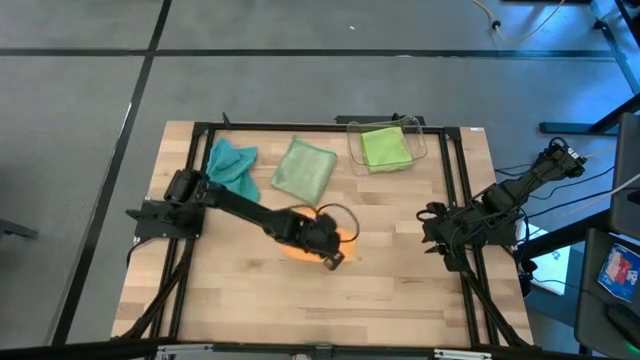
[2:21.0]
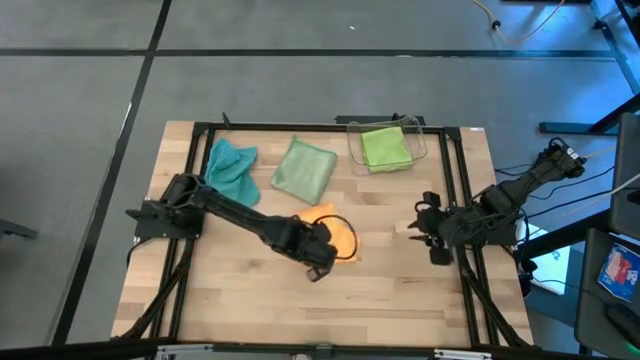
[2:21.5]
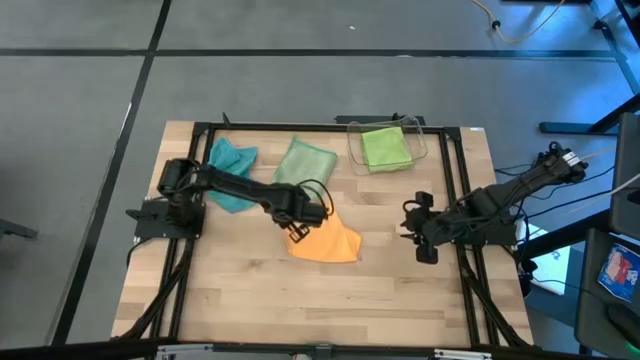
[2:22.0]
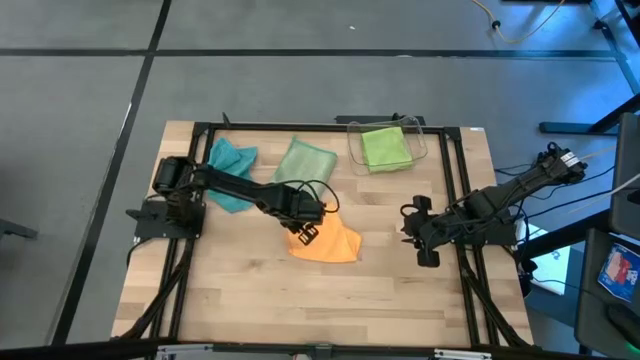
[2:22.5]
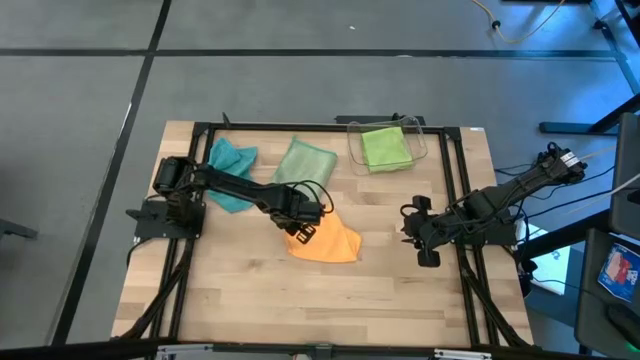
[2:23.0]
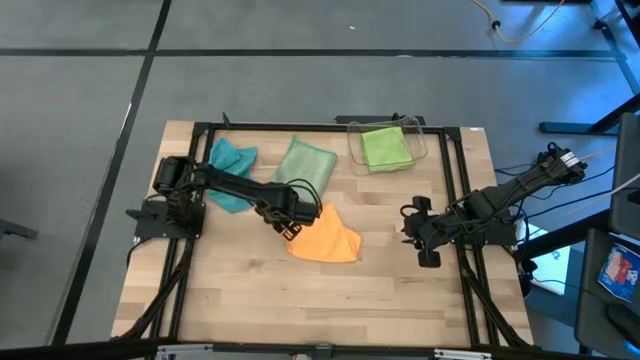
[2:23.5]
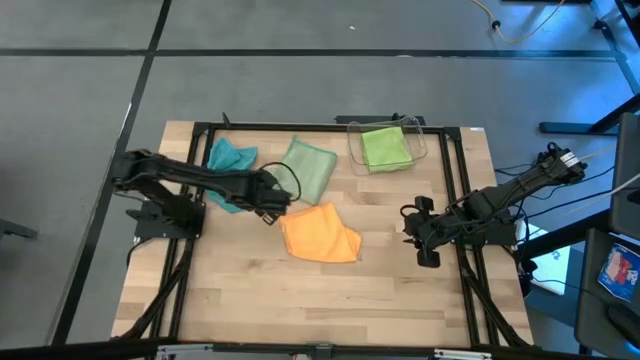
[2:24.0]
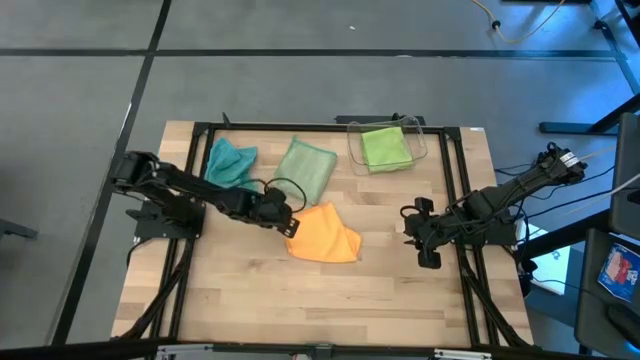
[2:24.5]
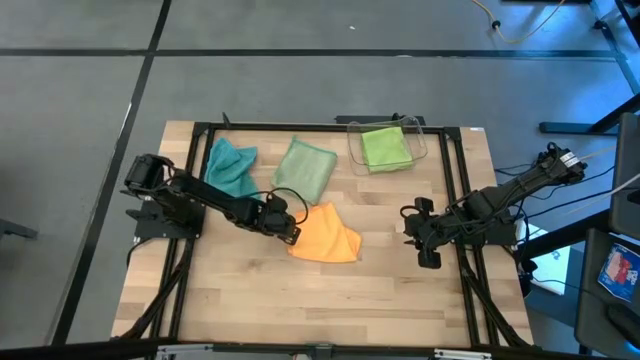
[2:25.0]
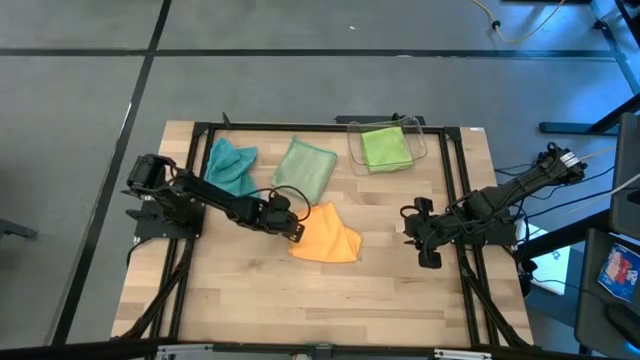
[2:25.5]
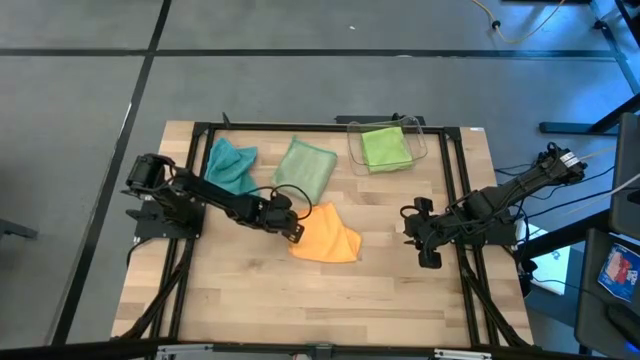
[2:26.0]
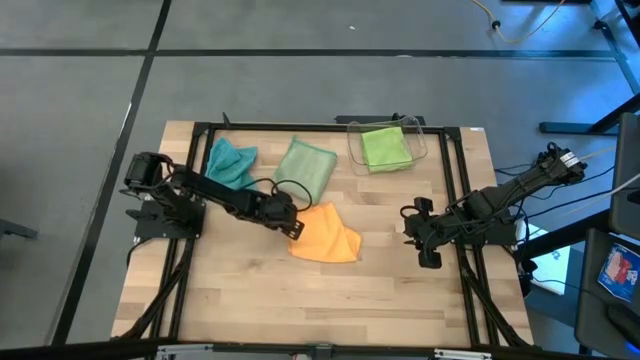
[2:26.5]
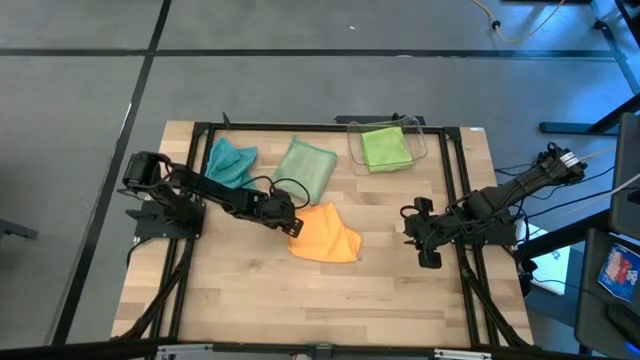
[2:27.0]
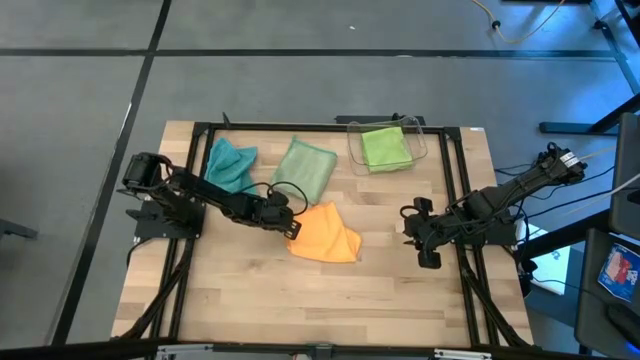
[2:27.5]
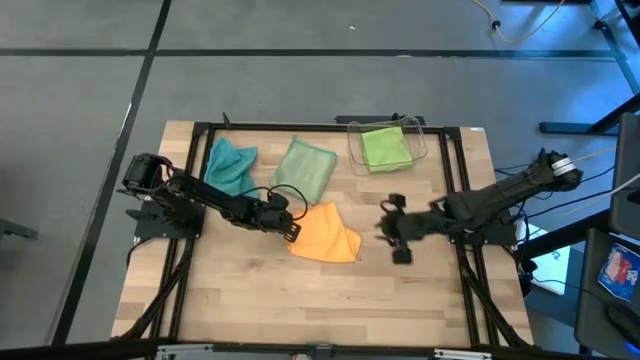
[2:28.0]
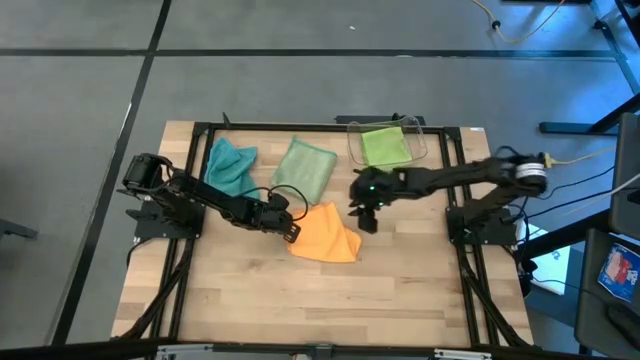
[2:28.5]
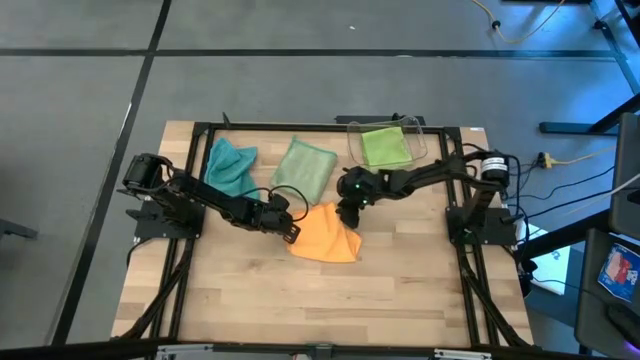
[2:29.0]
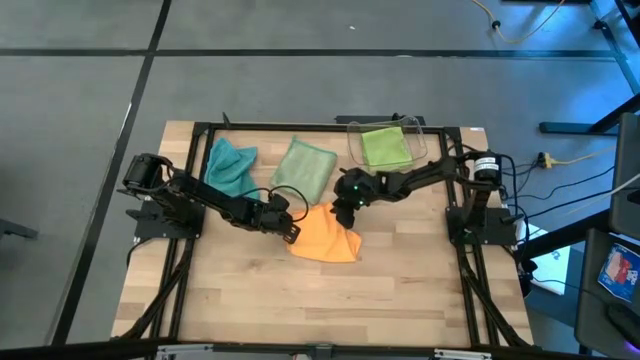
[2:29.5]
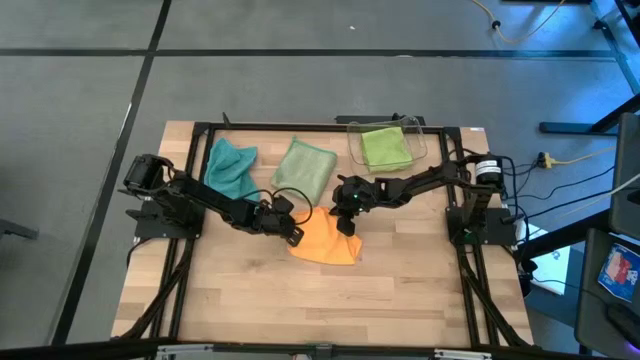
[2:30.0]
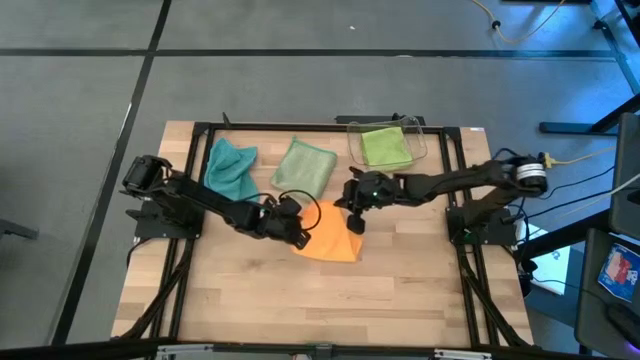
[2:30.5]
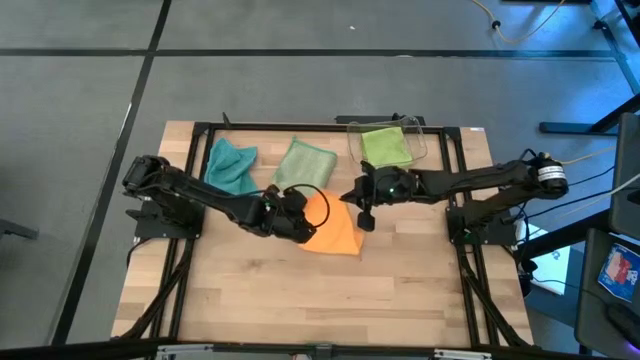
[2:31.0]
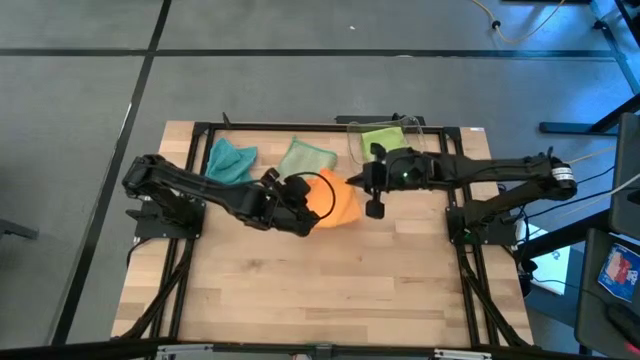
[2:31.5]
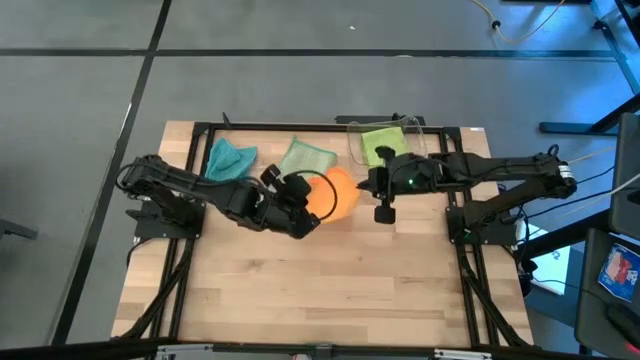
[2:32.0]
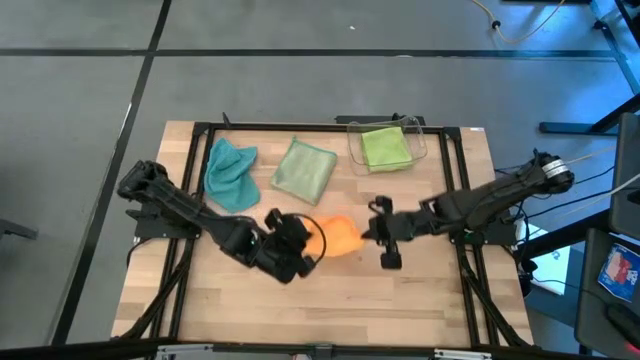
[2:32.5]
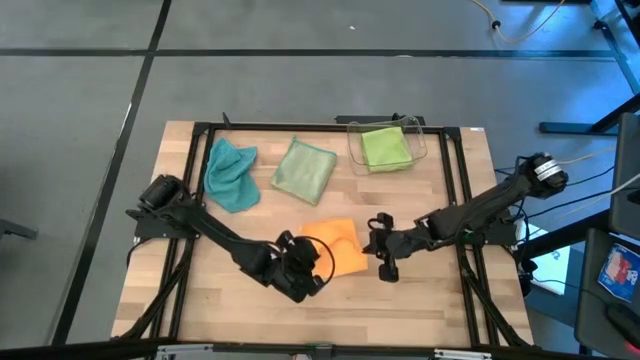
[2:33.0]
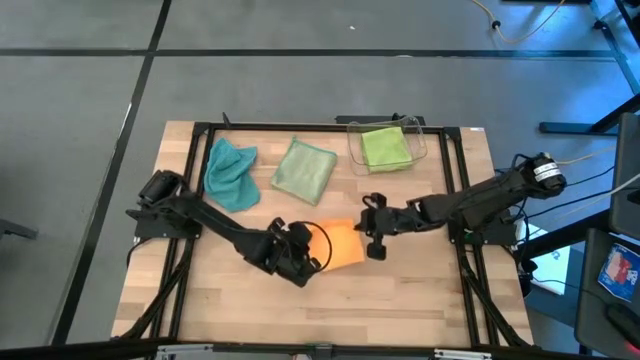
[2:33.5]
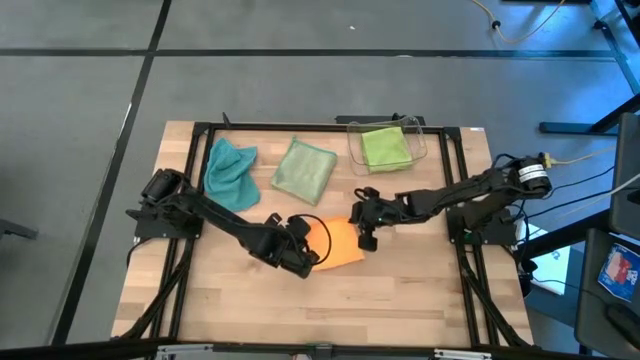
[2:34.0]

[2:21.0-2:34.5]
Task: Fold microfiber towels
Fold the orange microfiber towel on top of the light green microfiber towel

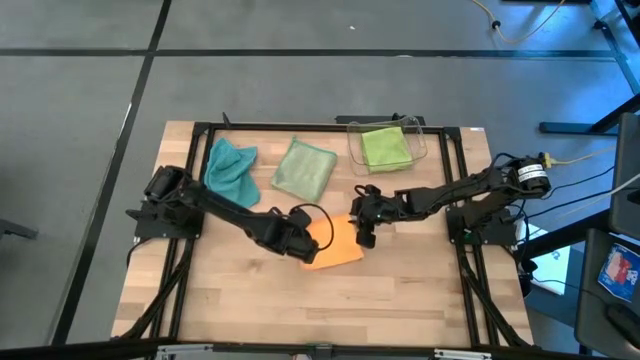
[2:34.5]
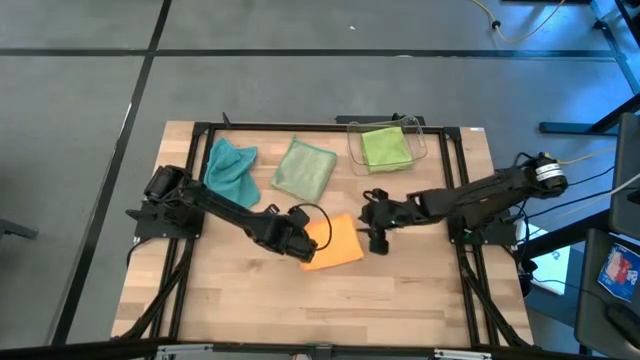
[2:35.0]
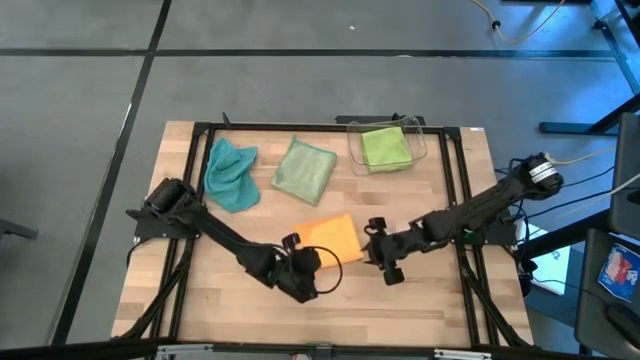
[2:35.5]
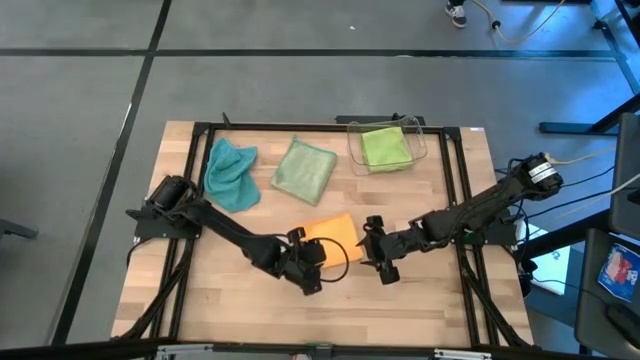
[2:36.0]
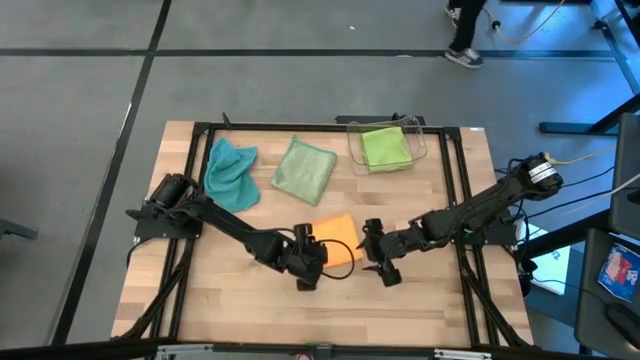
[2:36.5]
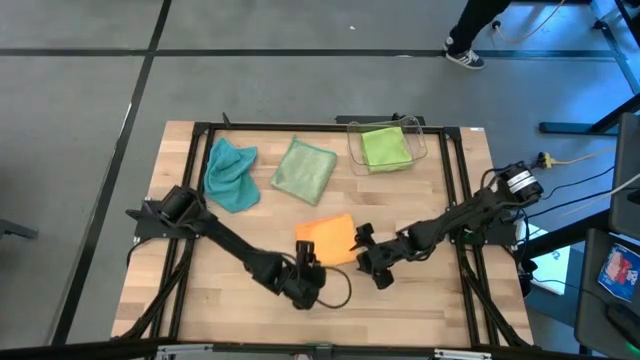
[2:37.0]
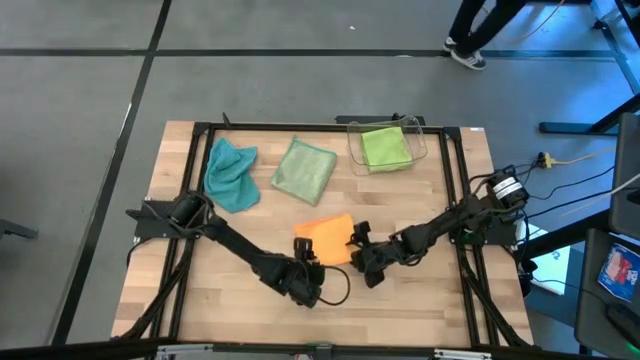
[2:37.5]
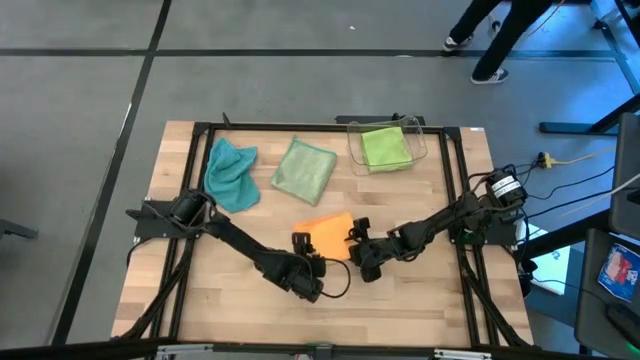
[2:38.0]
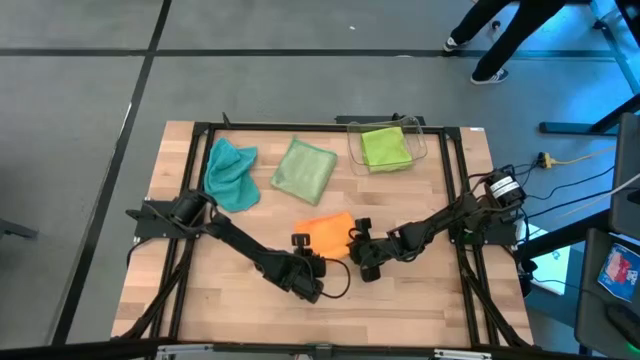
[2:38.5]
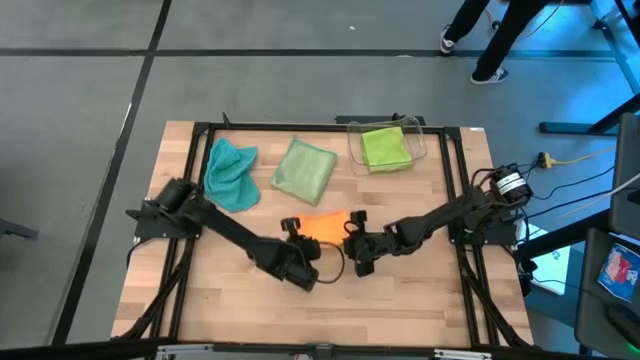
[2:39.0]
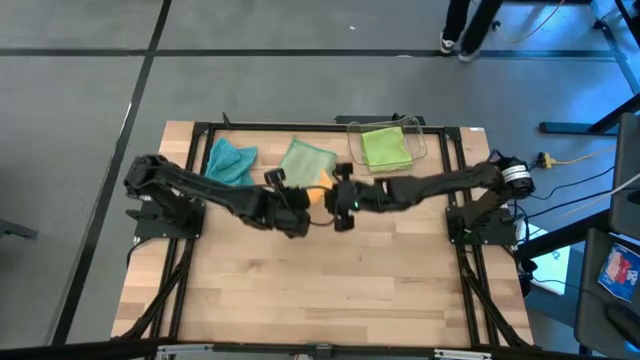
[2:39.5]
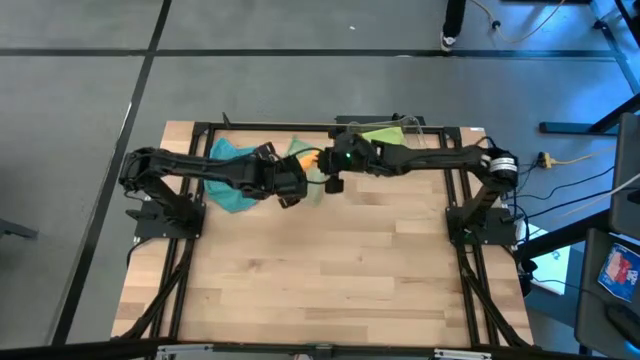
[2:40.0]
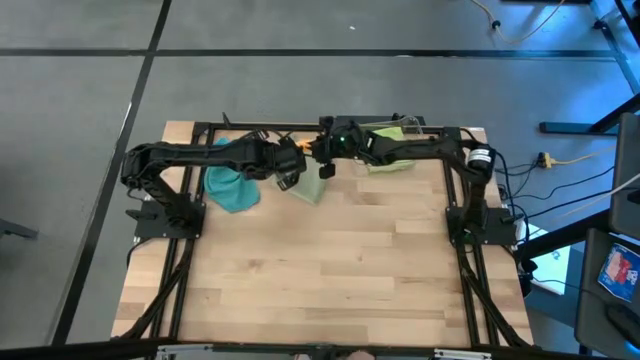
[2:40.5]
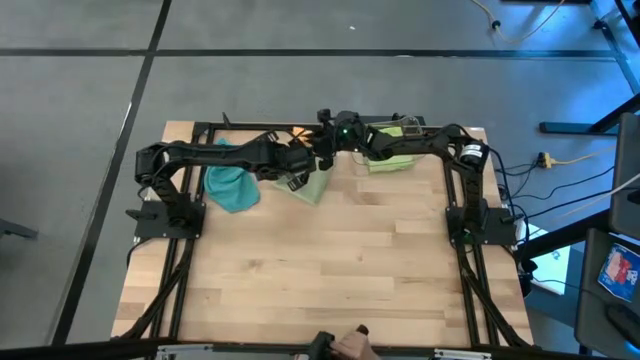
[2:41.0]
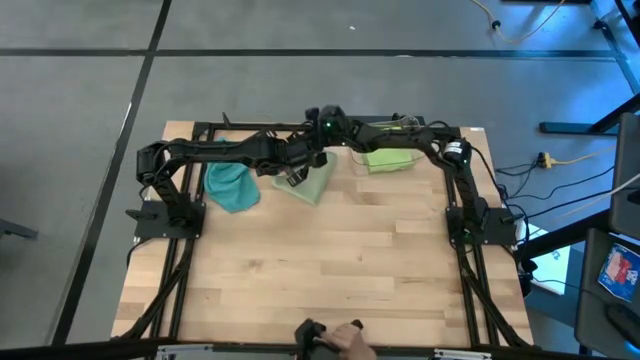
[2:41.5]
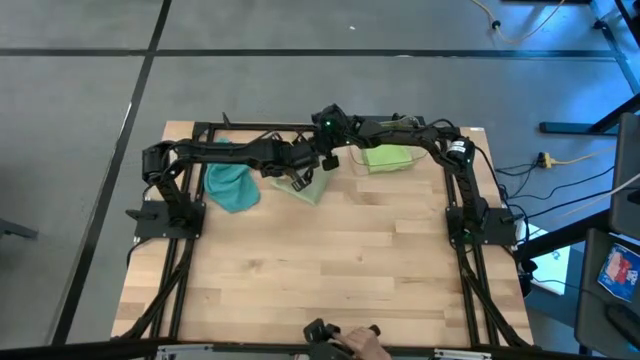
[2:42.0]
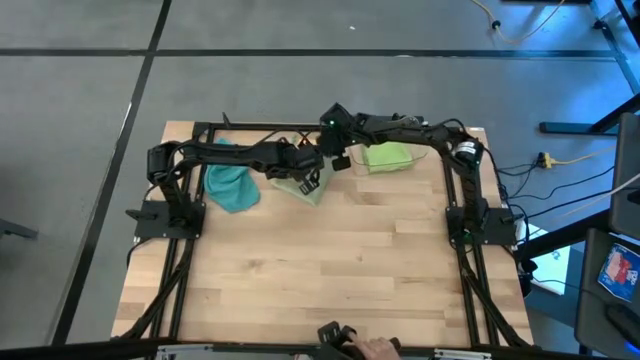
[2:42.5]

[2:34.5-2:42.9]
Stack the orange microfiber towel on top of the light green microfiber towel
